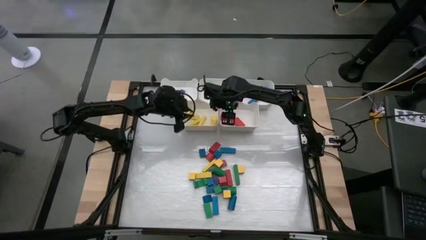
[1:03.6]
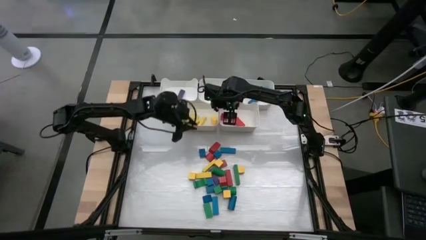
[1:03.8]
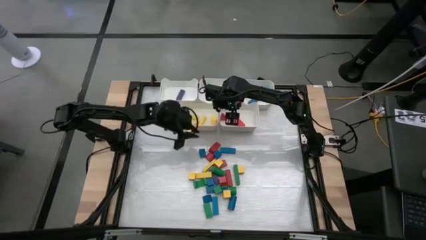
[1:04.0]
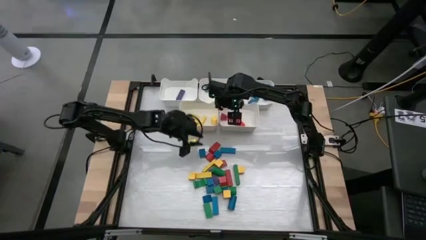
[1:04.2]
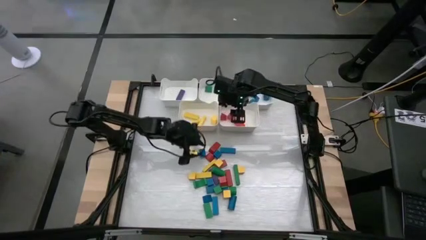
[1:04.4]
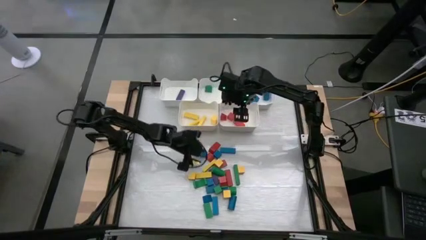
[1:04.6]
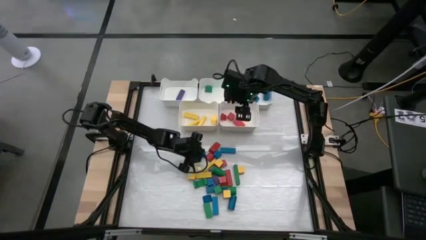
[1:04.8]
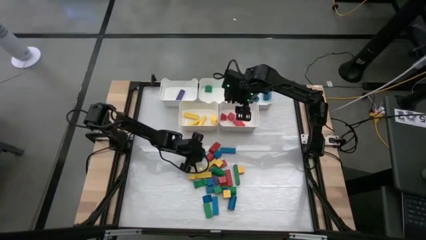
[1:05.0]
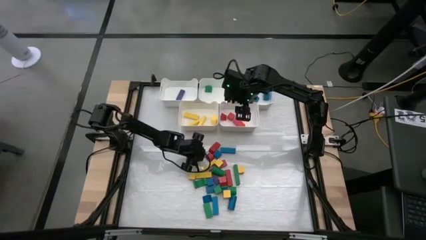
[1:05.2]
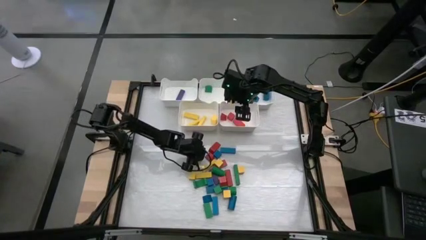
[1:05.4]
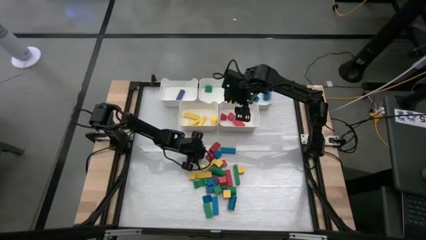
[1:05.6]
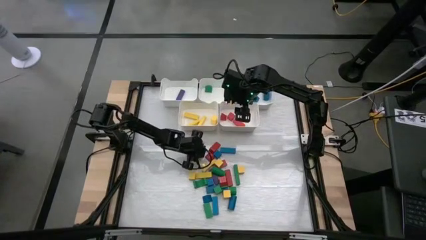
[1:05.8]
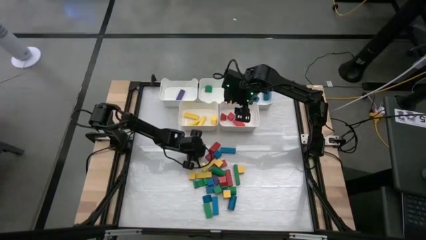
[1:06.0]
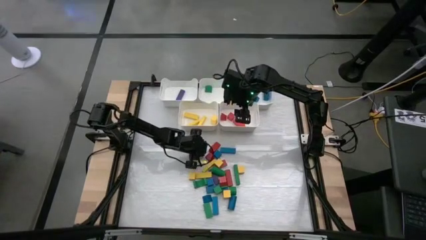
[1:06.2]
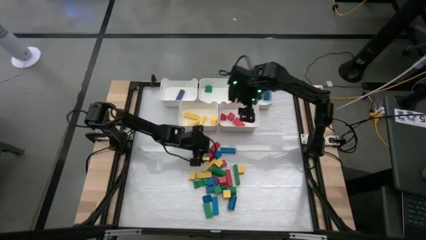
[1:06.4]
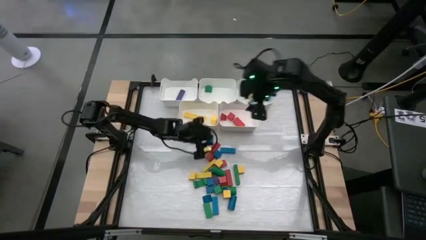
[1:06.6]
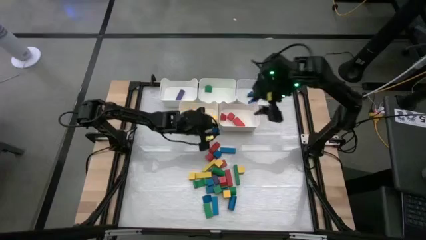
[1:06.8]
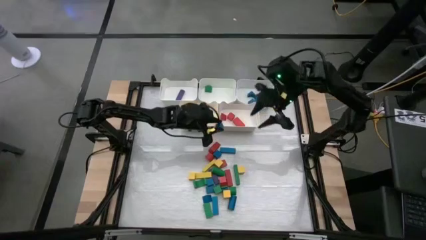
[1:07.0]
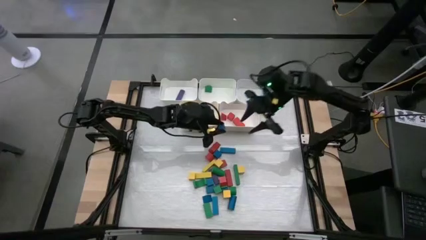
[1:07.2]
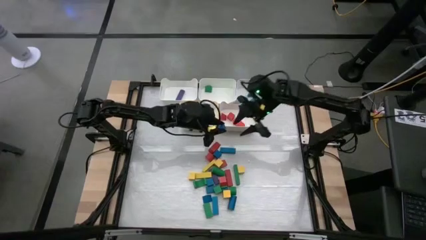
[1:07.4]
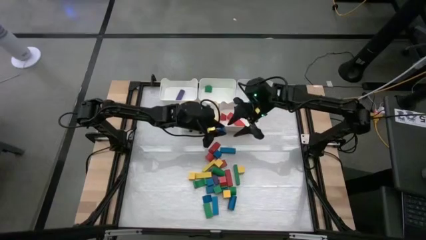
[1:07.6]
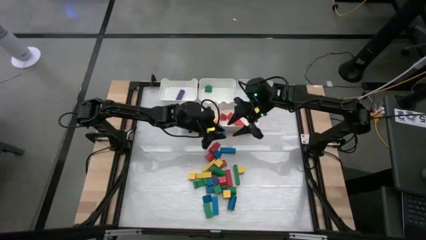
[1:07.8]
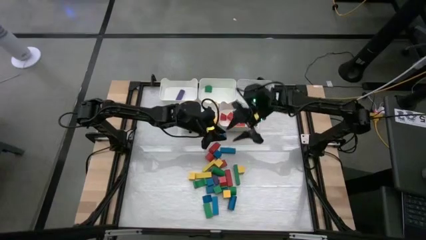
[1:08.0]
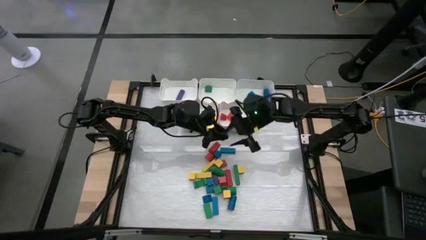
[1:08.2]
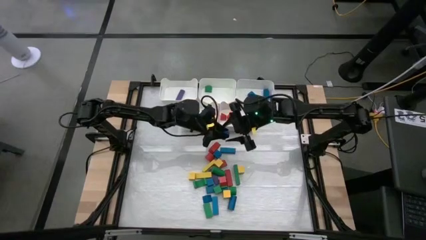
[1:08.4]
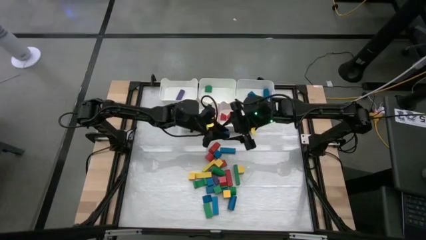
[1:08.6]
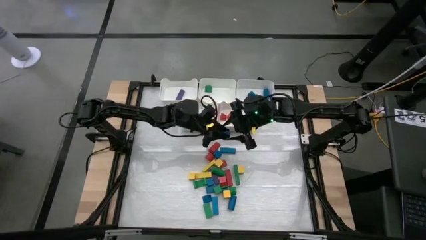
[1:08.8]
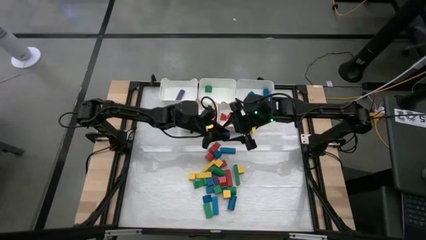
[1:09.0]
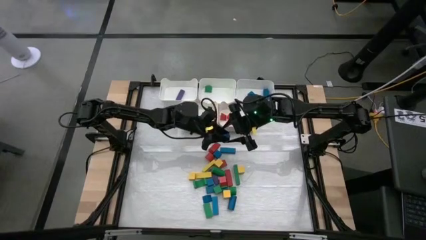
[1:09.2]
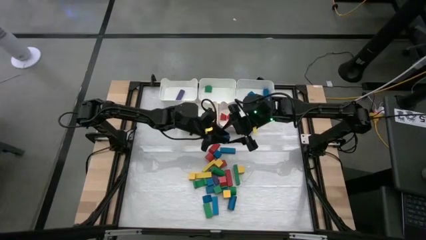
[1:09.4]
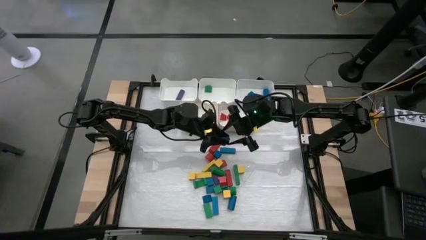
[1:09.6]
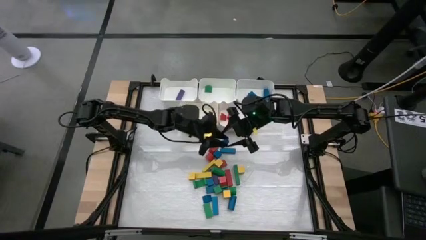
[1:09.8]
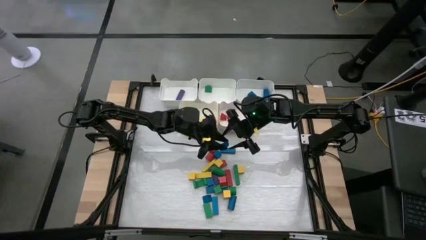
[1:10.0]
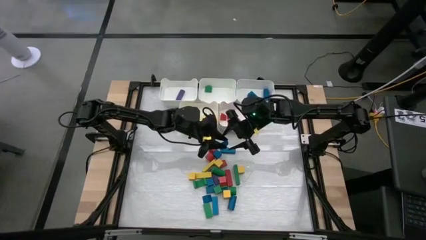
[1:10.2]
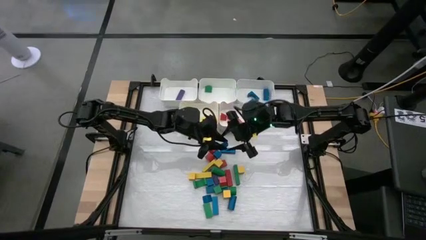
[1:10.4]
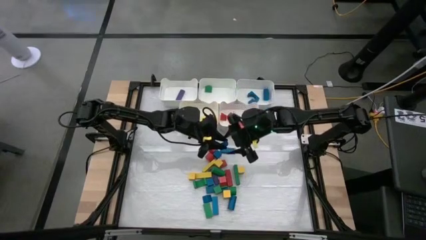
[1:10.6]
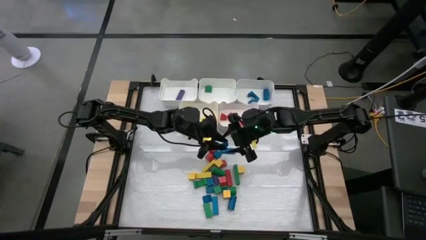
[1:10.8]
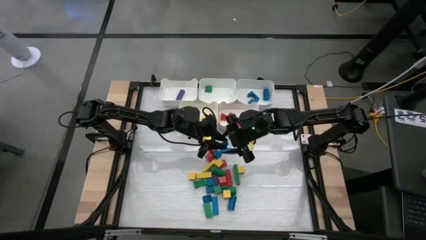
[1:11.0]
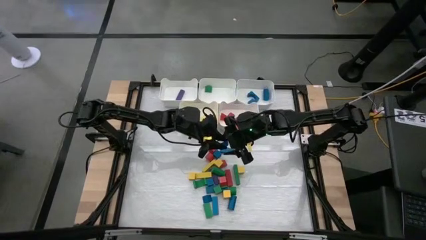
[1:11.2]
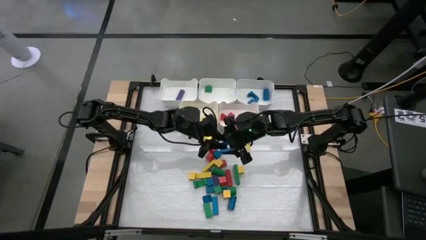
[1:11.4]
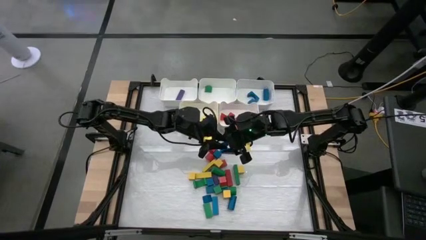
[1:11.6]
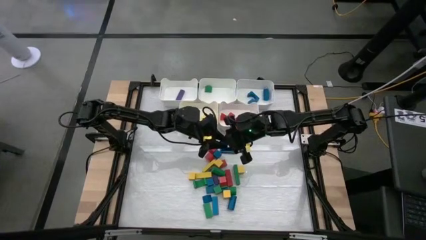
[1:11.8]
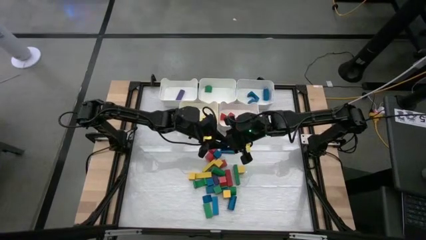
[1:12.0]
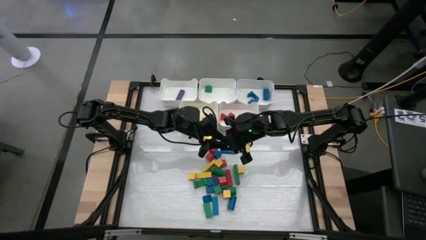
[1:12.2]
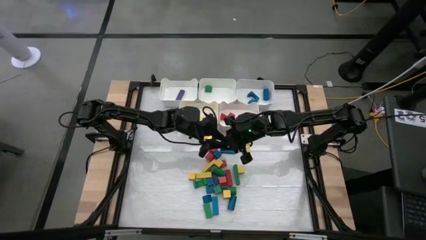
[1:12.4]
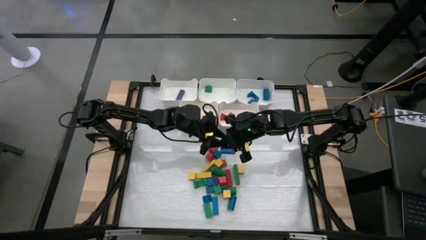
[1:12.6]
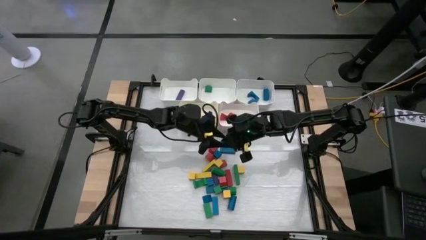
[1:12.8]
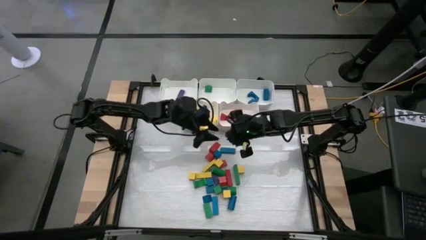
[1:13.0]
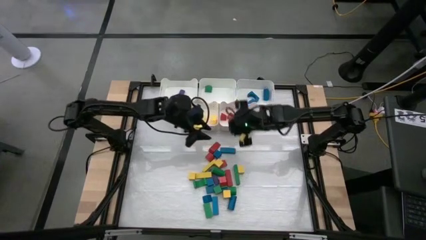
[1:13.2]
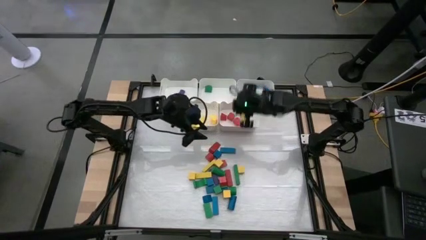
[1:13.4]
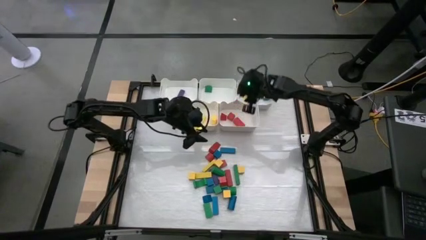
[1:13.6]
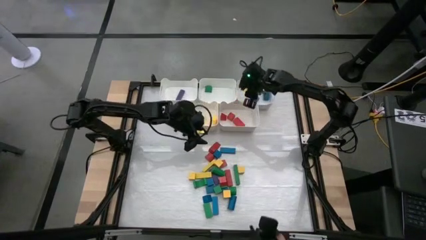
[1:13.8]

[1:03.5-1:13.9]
Task: Sort blocks
Put the blue block into the top right bin

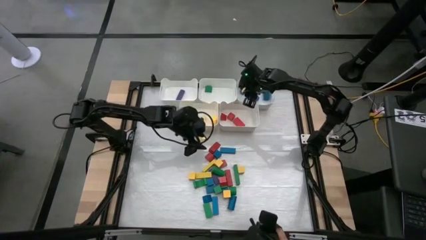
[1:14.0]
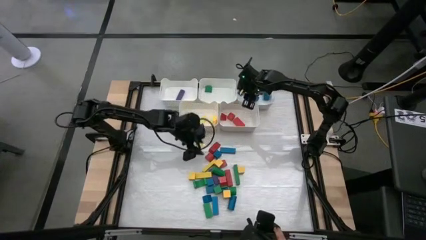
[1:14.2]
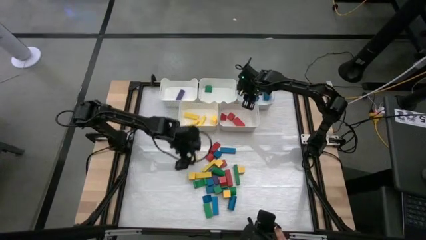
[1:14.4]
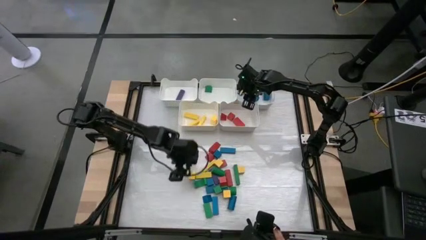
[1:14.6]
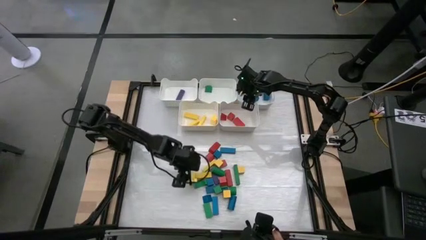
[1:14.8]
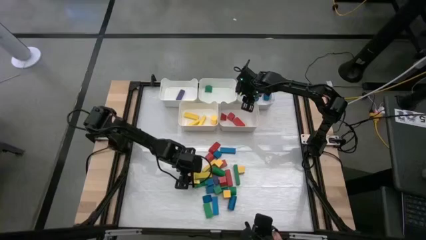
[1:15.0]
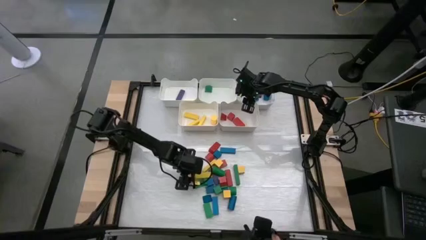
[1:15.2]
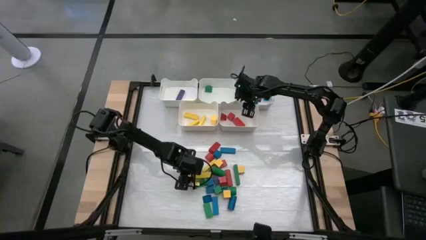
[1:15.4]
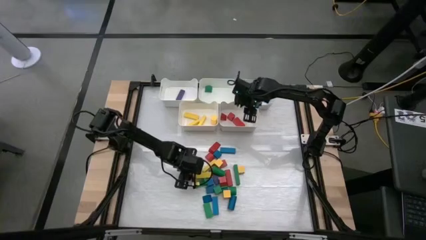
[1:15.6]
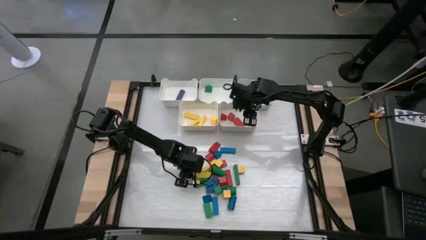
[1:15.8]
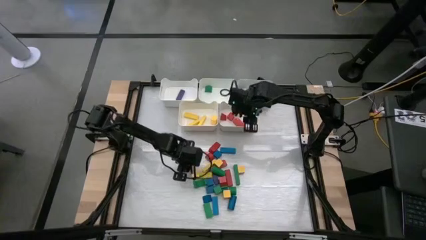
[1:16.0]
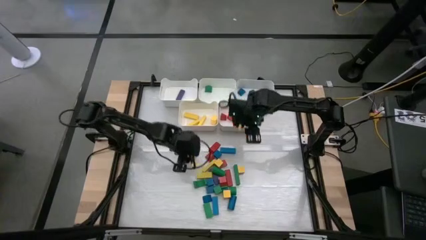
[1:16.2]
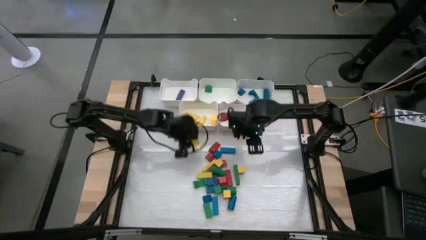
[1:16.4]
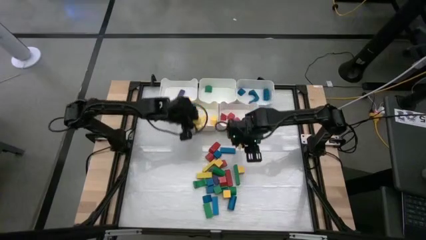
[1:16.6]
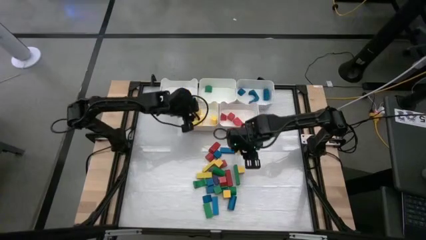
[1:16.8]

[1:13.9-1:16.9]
Put the yellow block into the bottom left bin

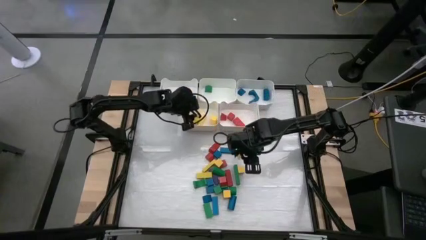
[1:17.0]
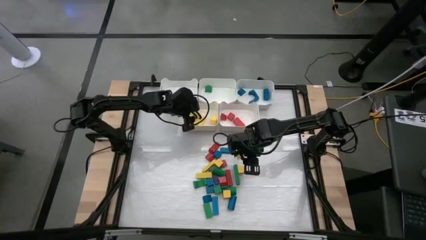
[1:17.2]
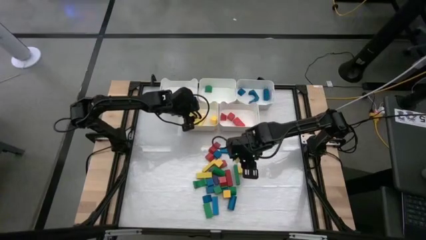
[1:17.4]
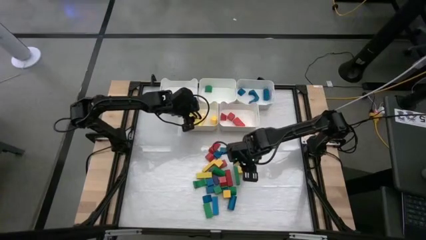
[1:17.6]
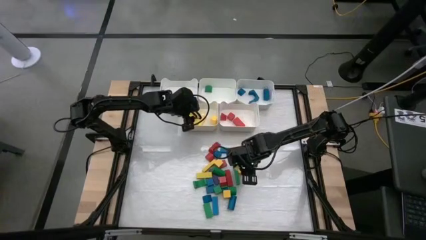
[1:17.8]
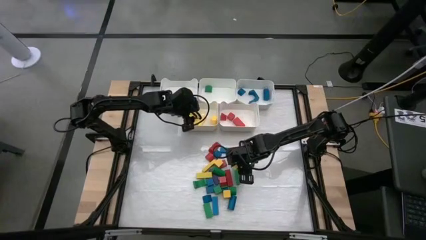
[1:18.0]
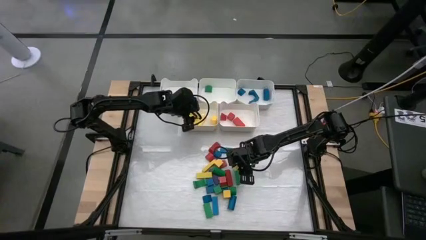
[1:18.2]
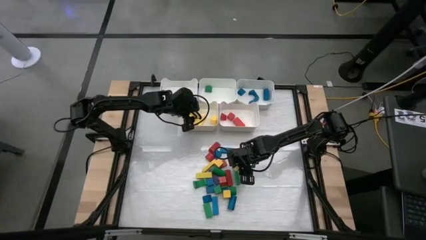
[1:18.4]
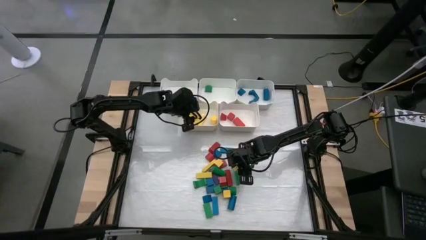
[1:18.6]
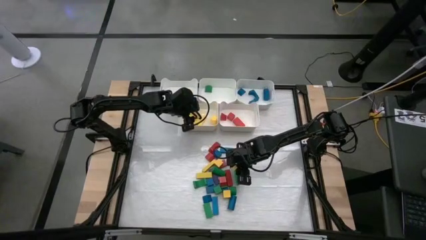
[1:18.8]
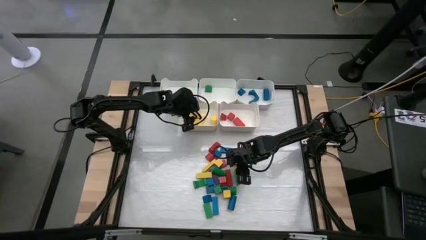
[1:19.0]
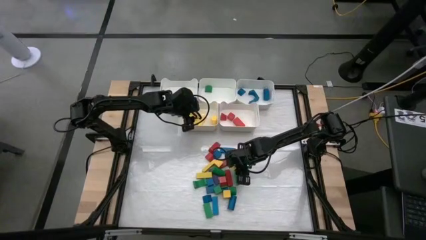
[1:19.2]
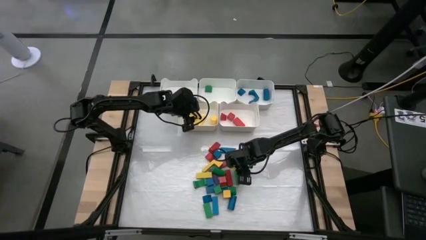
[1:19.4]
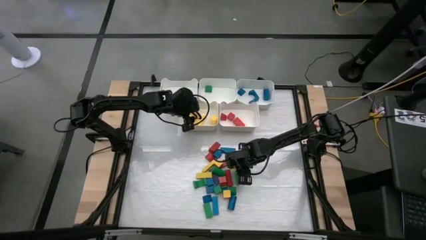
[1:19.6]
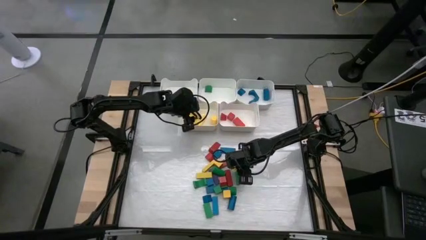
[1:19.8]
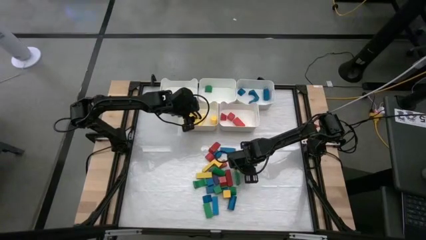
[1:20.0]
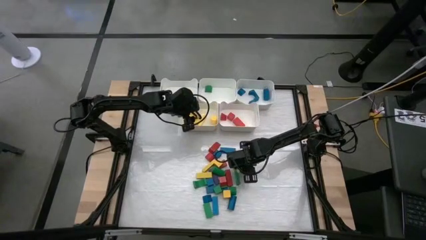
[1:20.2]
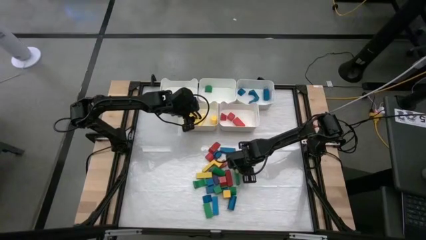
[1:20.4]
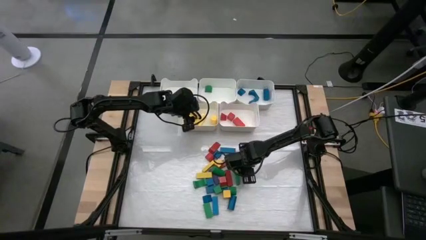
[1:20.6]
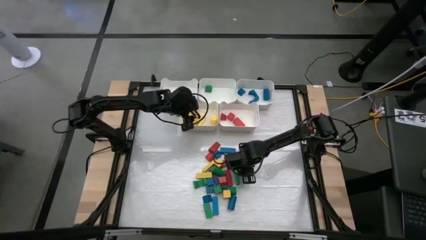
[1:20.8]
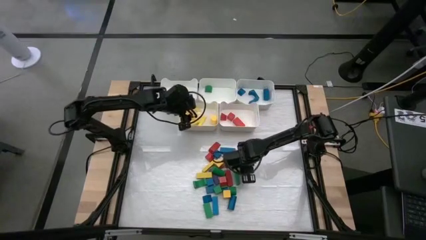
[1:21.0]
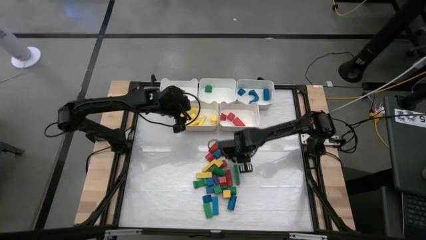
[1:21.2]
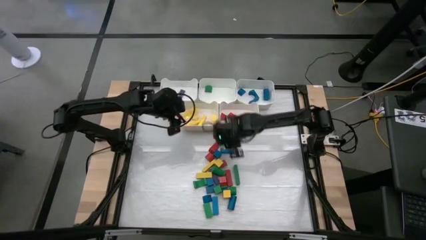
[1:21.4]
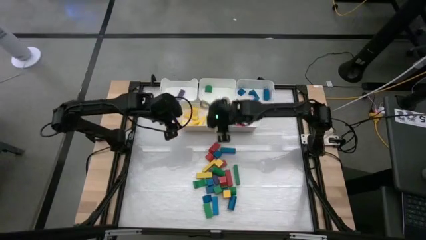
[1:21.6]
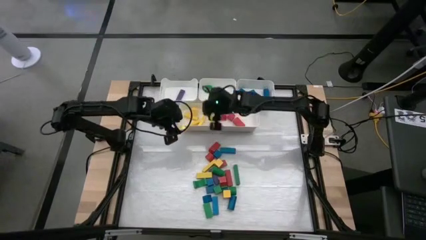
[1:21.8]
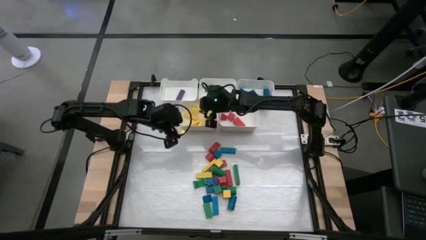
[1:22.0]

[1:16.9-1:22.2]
Put the yellow block into the bottom left bin
